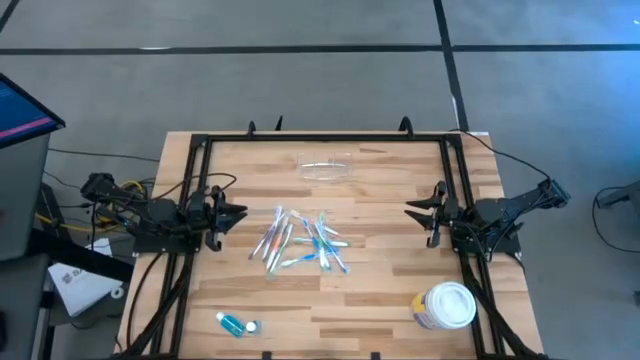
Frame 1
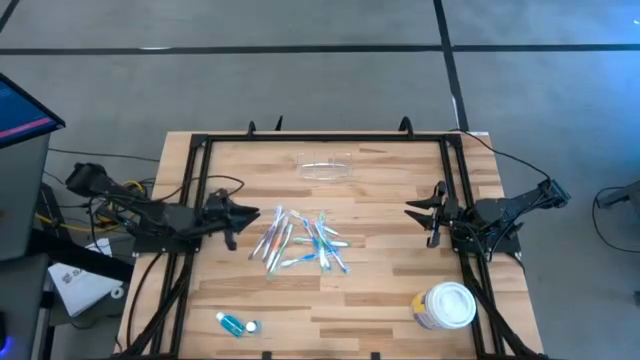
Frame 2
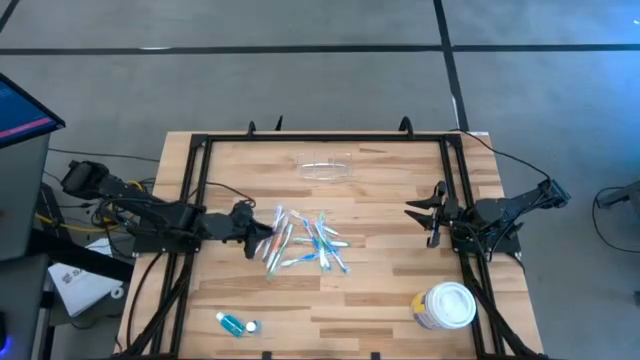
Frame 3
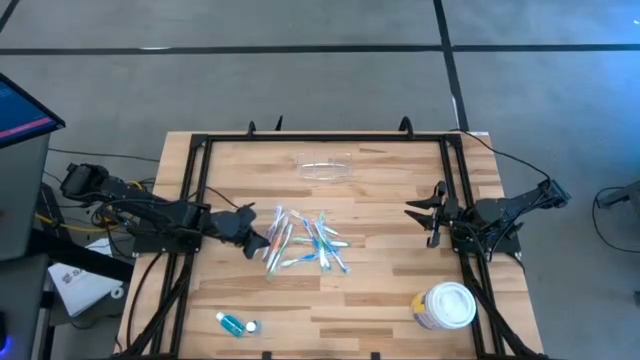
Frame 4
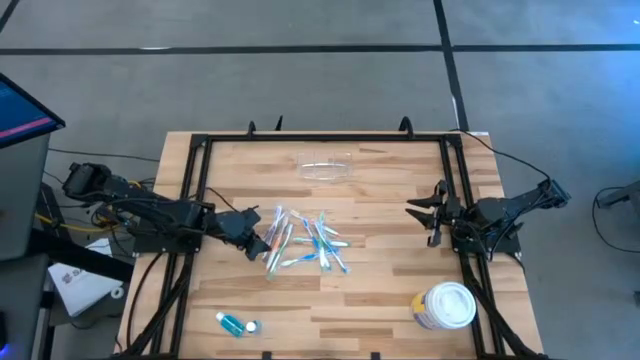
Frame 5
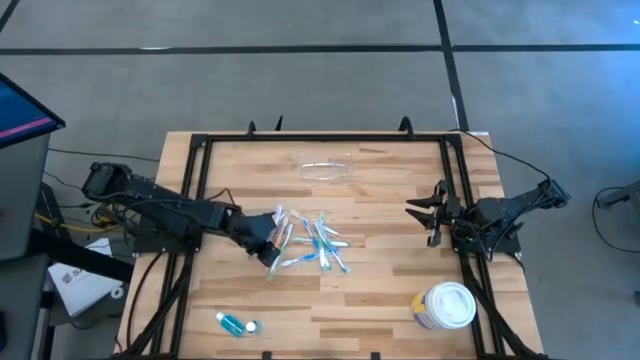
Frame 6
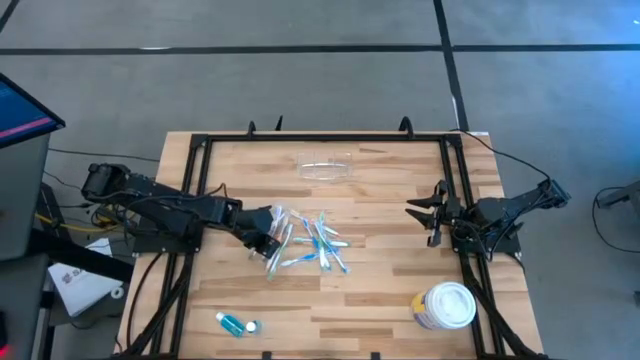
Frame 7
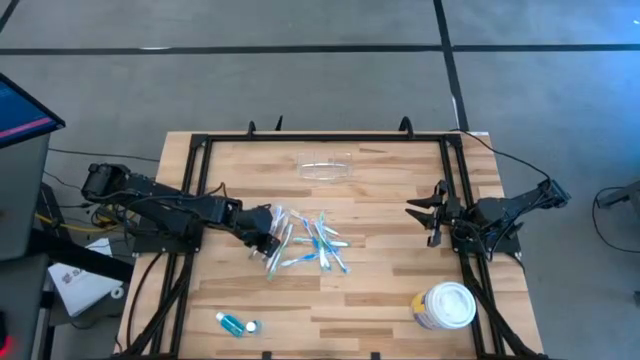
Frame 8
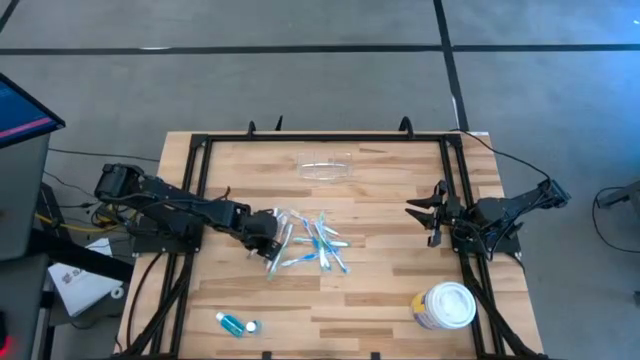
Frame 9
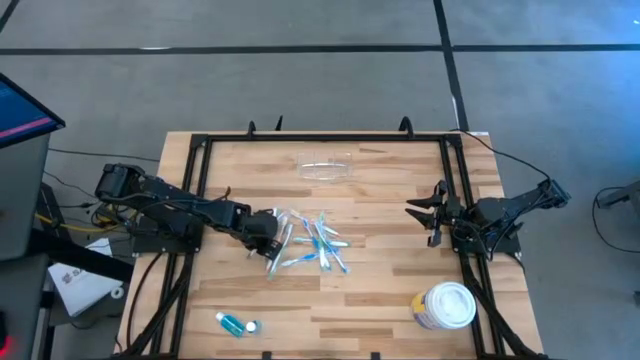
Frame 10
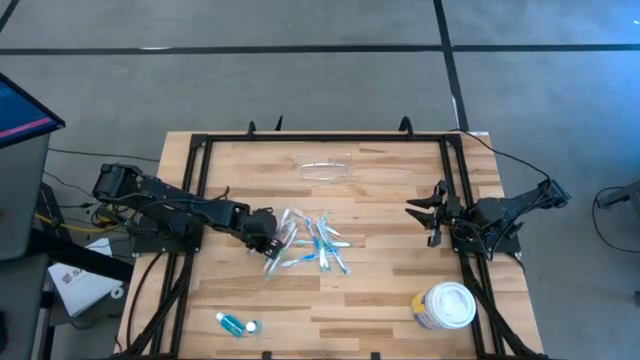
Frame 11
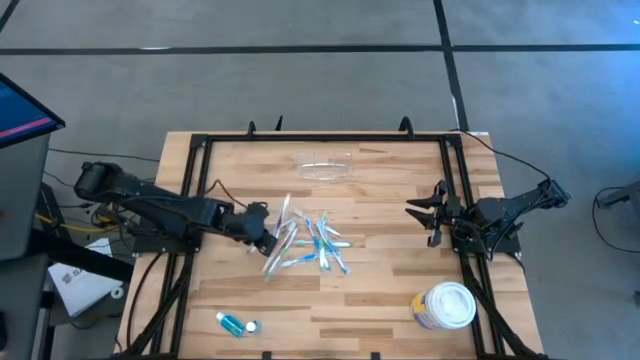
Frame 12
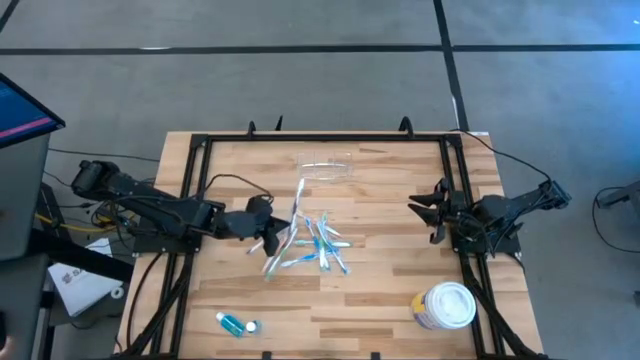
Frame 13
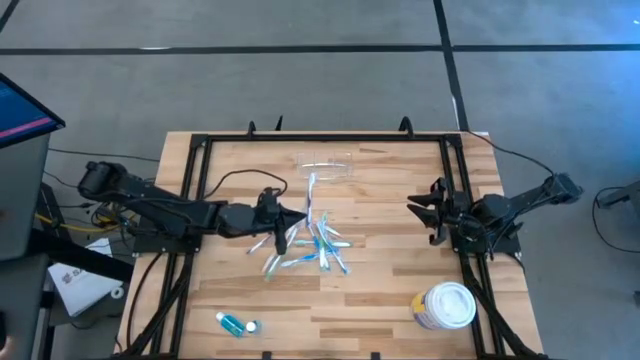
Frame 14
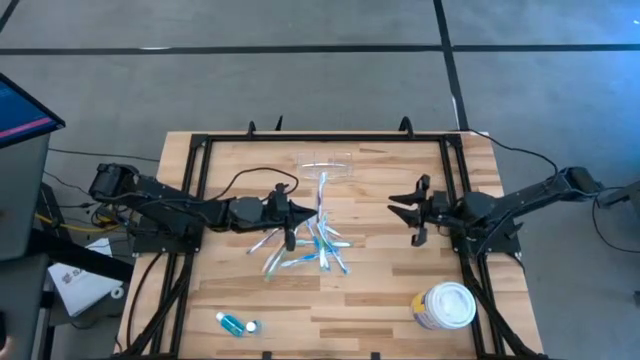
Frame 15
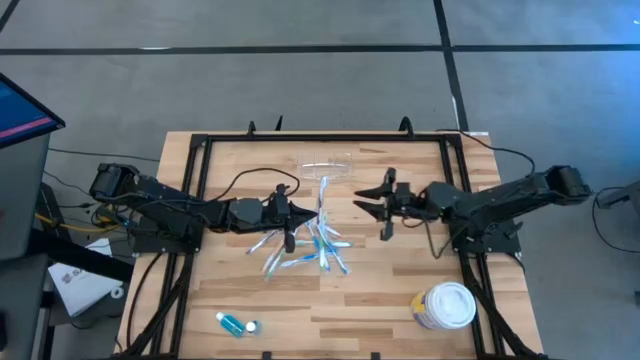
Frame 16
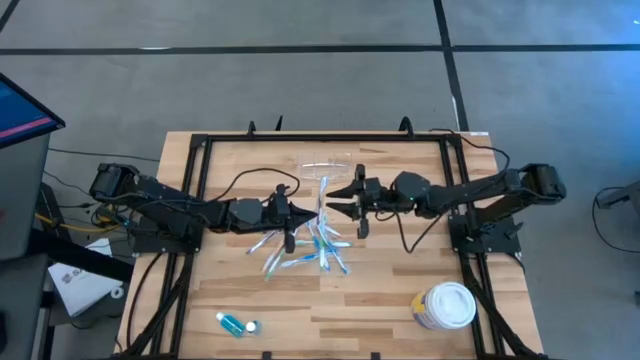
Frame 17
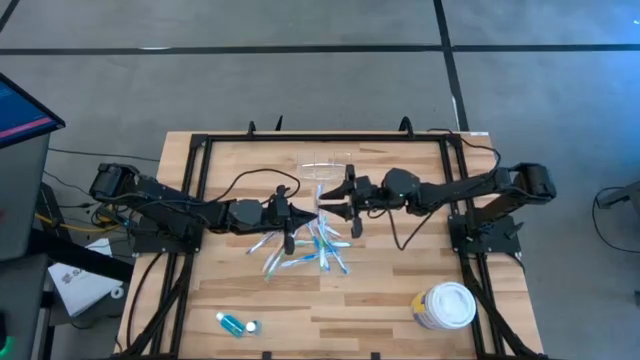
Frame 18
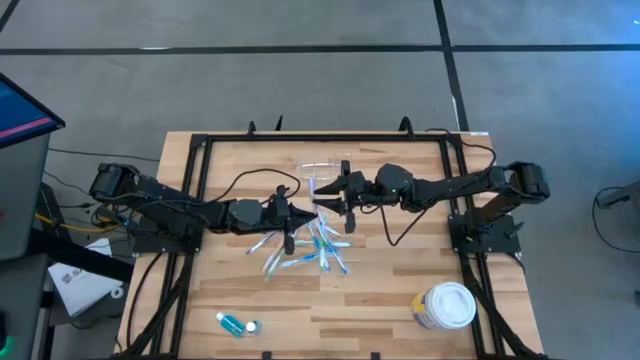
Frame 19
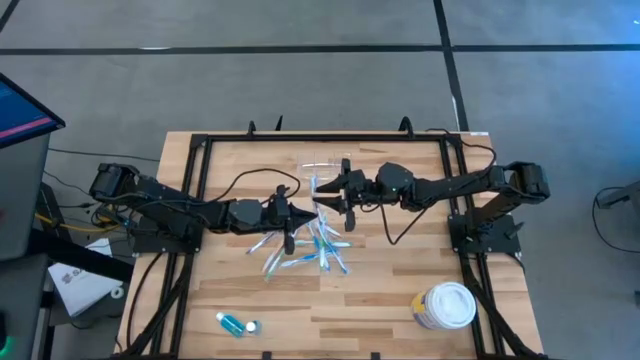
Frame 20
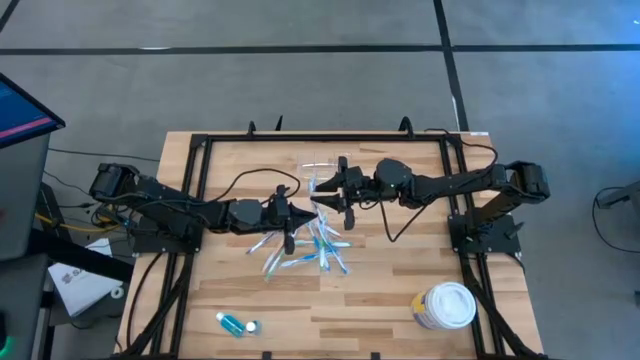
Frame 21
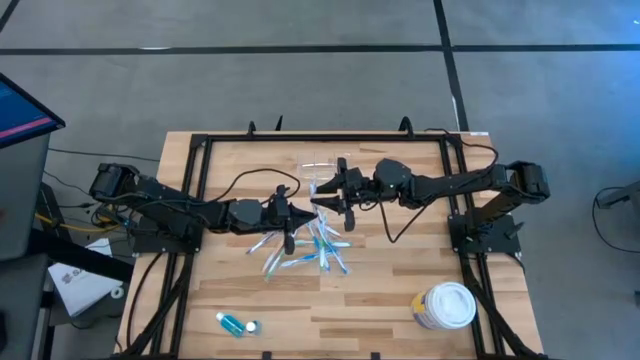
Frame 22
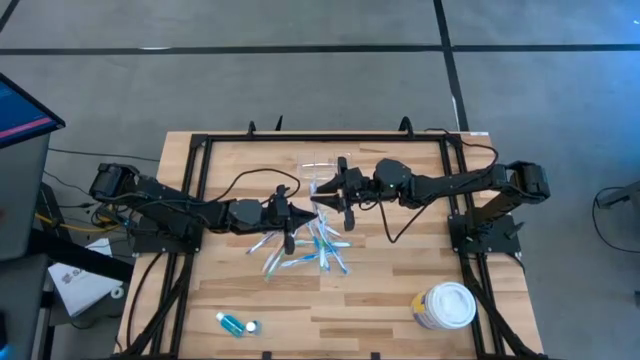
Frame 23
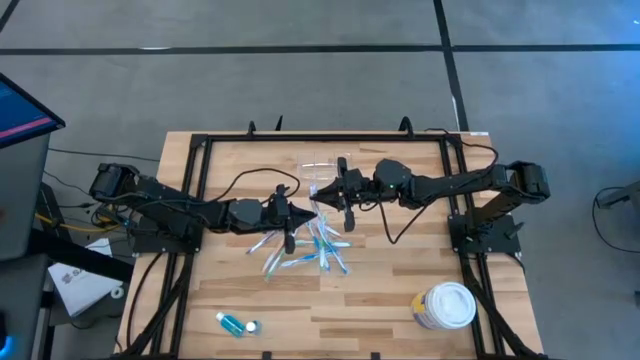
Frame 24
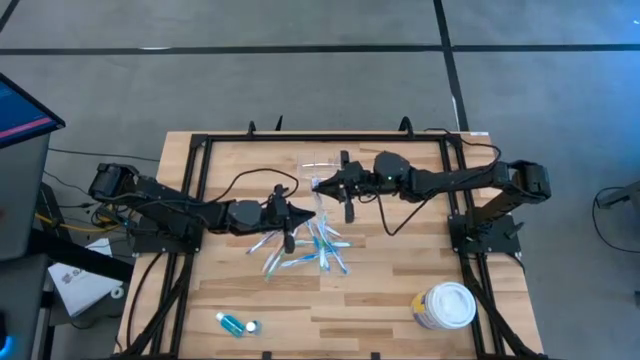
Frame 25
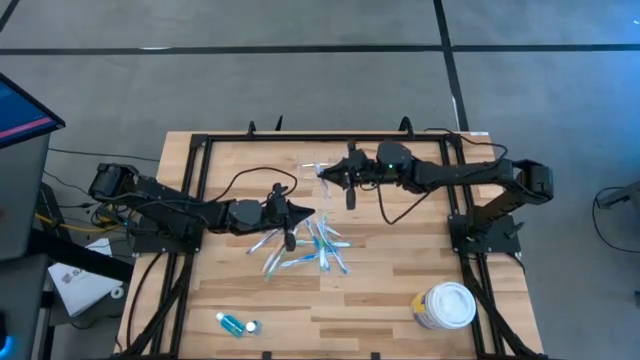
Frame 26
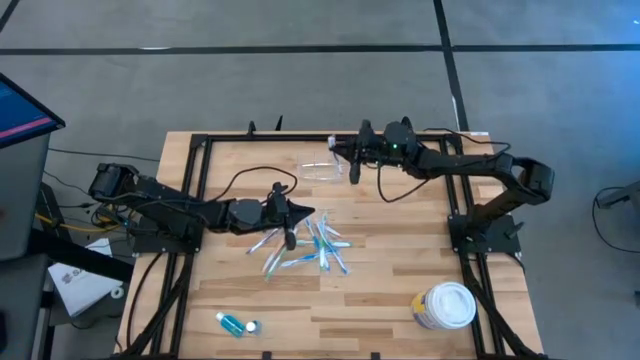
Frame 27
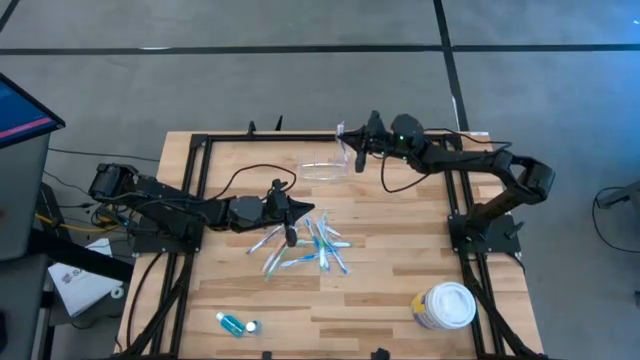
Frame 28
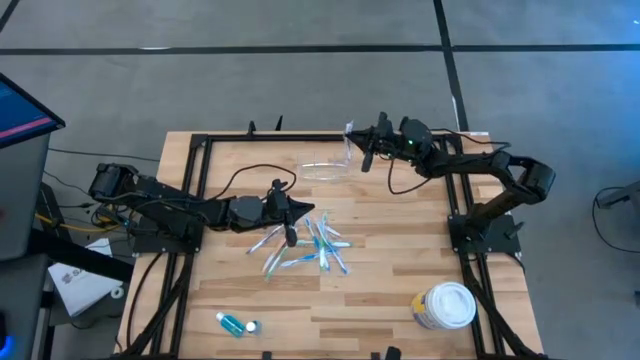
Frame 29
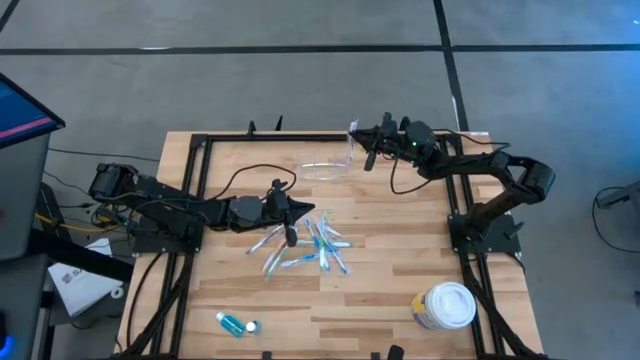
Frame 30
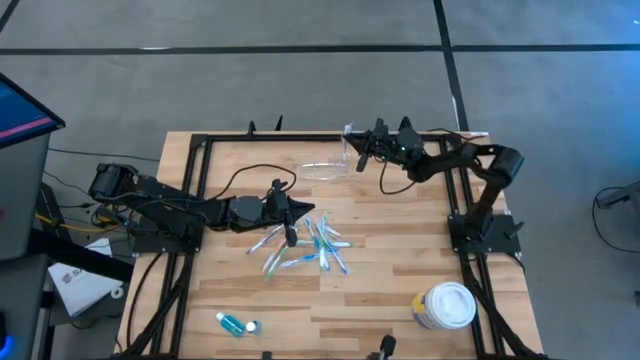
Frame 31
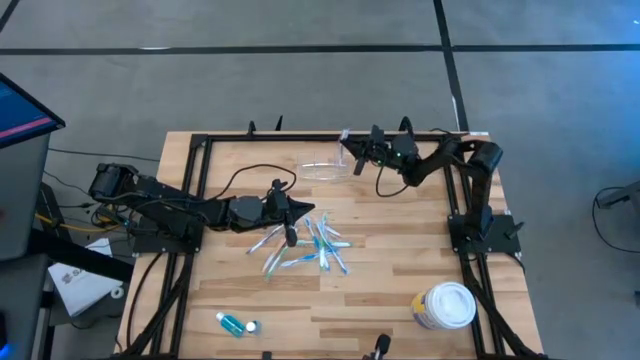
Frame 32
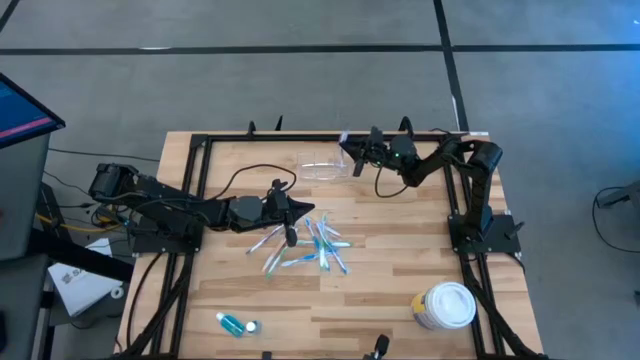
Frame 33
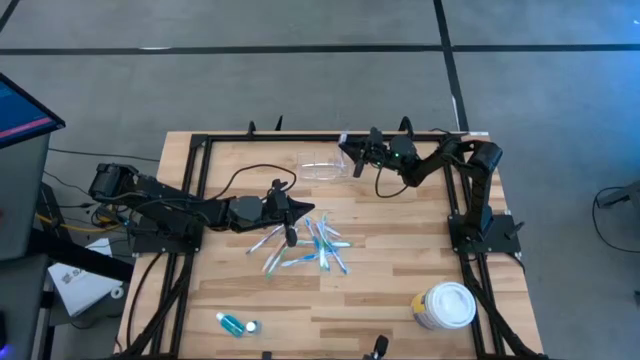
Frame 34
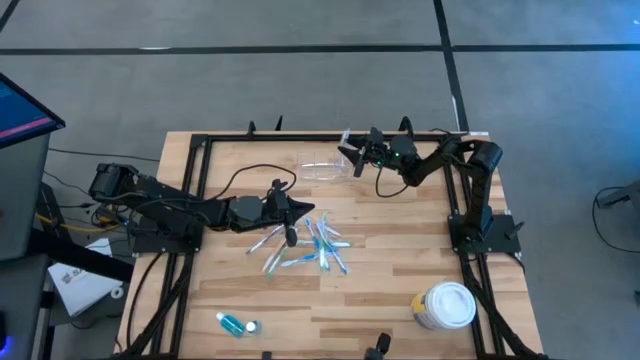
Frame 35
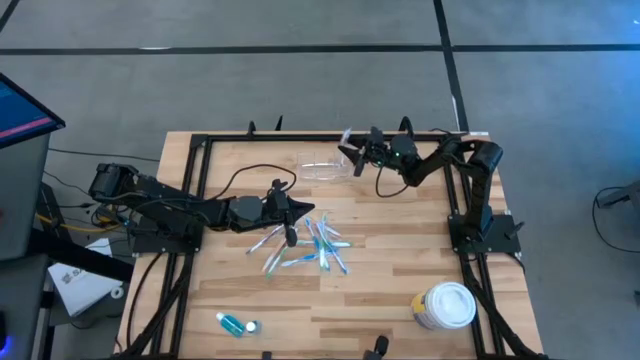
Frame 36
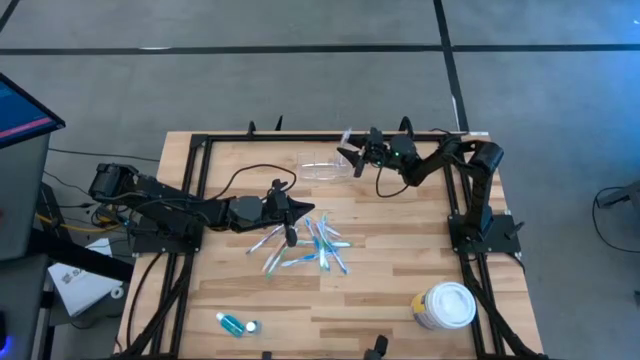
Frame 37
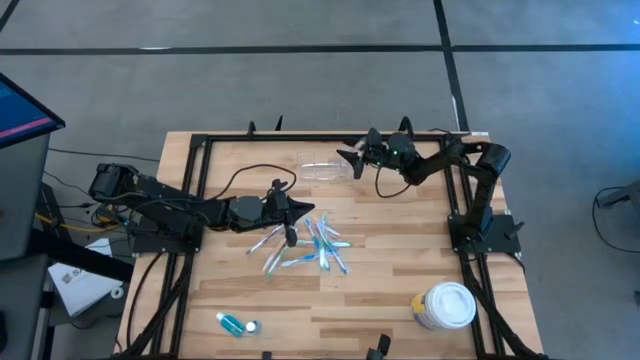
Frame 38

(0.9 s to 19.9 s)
Task: Pick & Place toothbrushing station
Put the violet toothbrush into the transparent organizer
